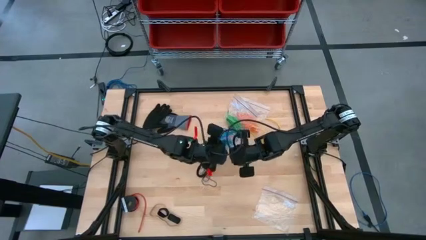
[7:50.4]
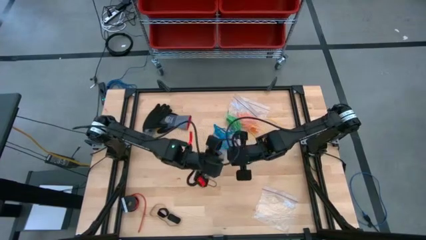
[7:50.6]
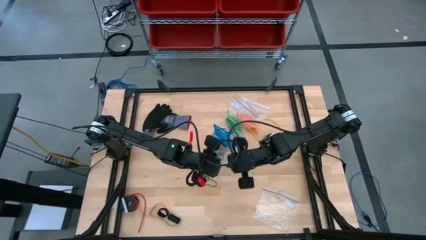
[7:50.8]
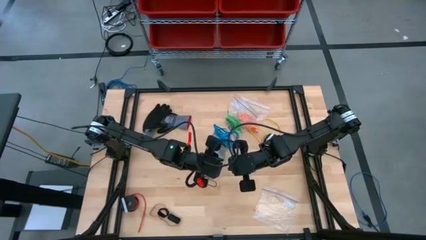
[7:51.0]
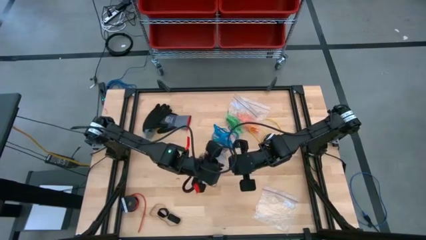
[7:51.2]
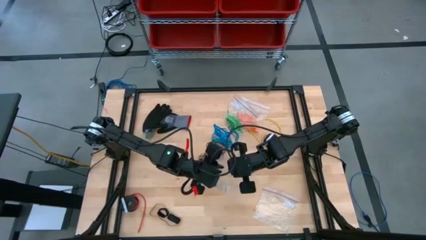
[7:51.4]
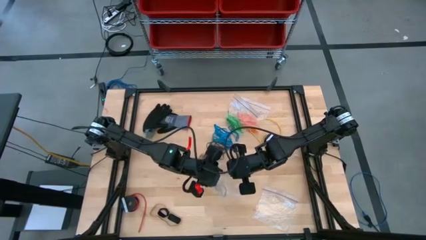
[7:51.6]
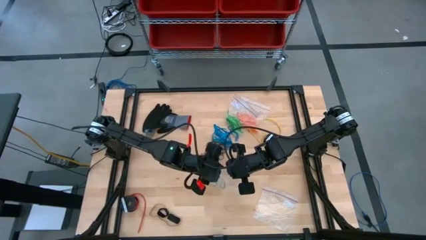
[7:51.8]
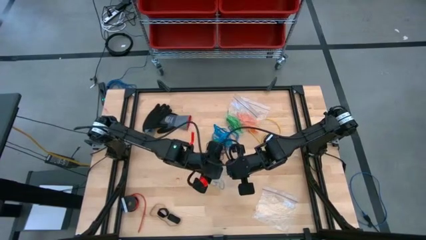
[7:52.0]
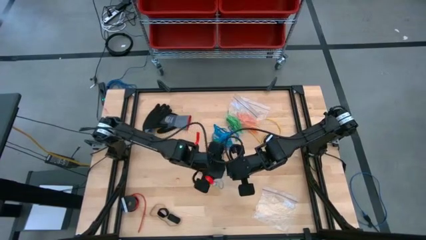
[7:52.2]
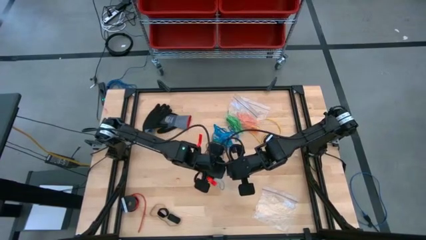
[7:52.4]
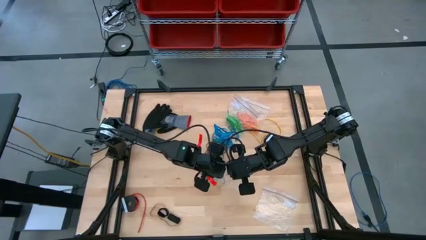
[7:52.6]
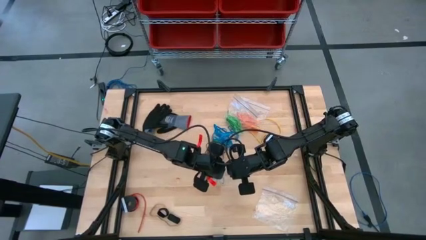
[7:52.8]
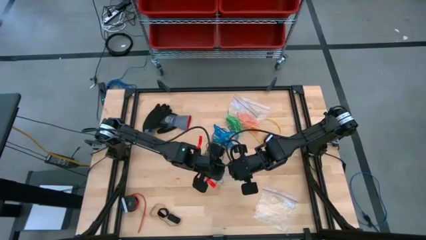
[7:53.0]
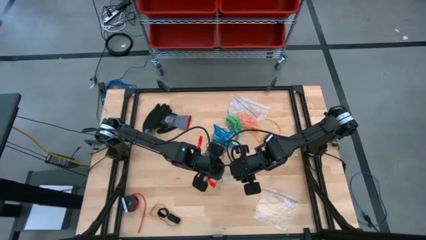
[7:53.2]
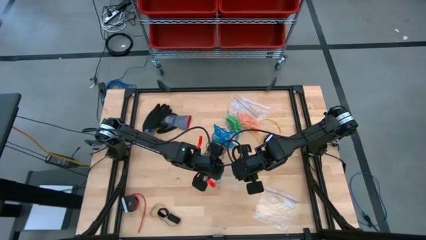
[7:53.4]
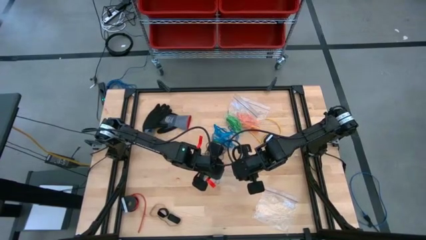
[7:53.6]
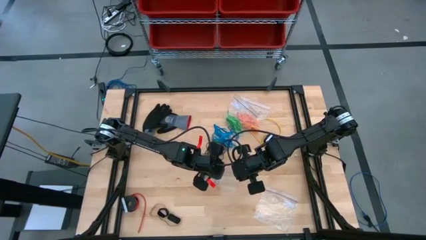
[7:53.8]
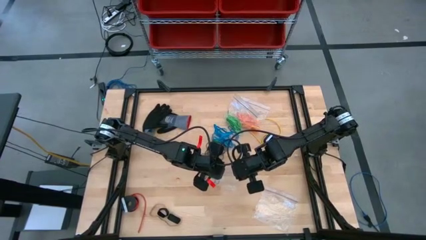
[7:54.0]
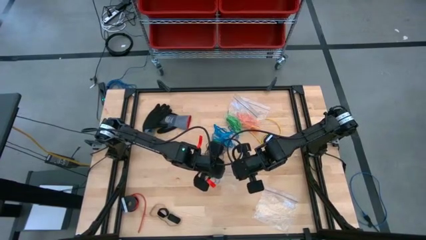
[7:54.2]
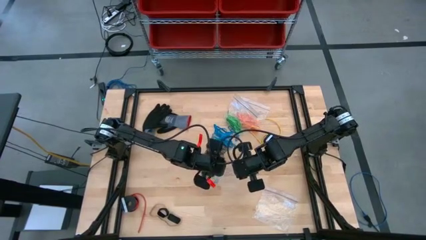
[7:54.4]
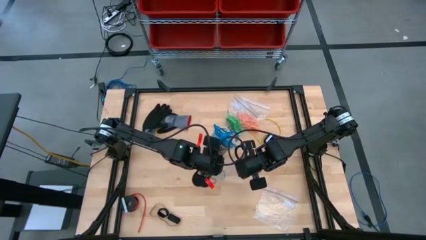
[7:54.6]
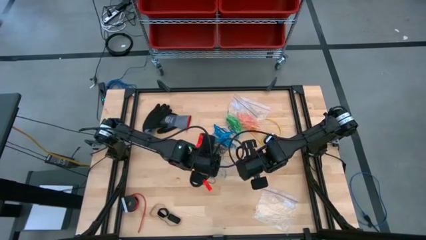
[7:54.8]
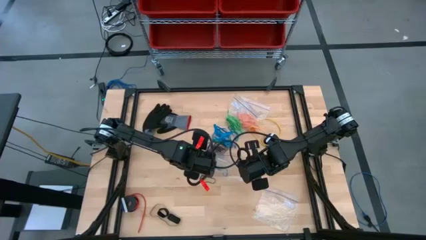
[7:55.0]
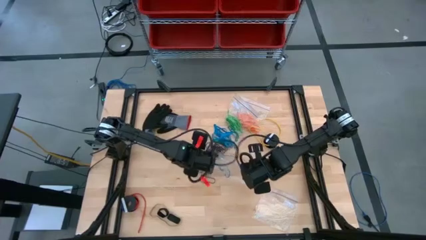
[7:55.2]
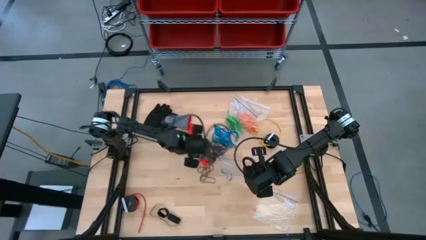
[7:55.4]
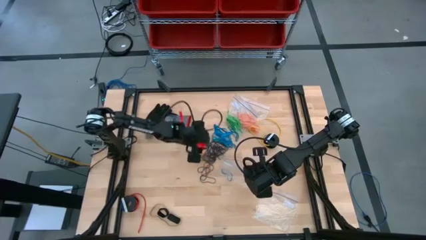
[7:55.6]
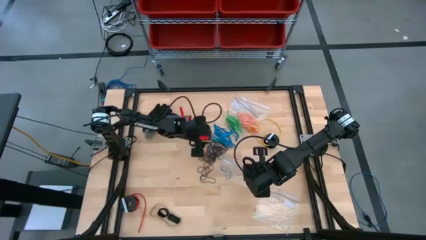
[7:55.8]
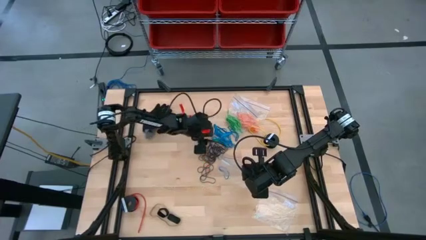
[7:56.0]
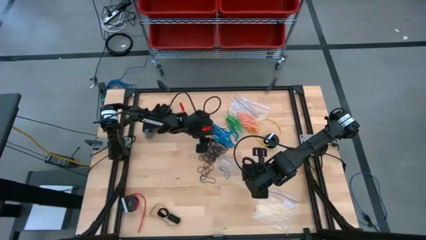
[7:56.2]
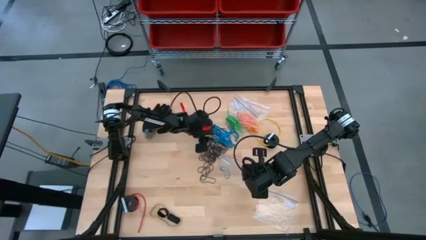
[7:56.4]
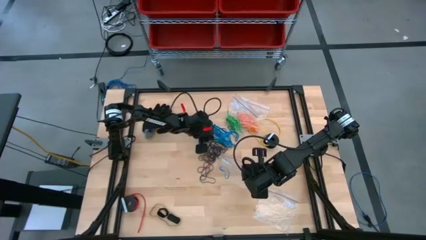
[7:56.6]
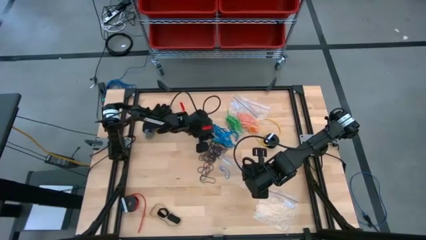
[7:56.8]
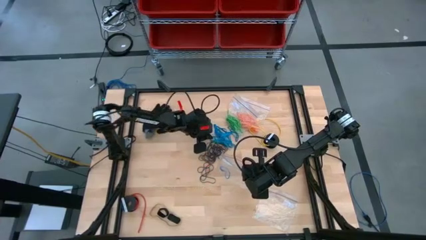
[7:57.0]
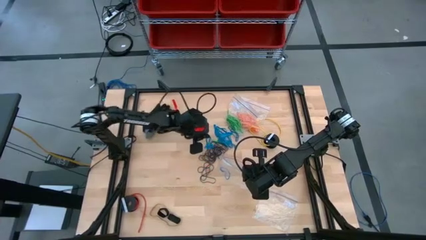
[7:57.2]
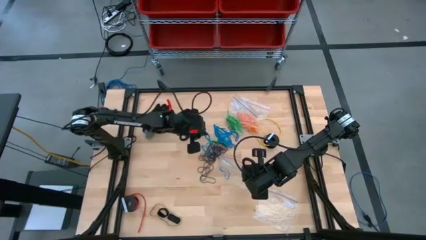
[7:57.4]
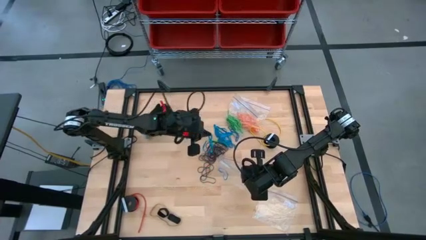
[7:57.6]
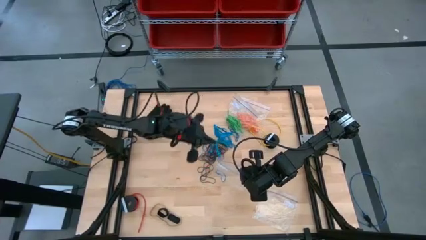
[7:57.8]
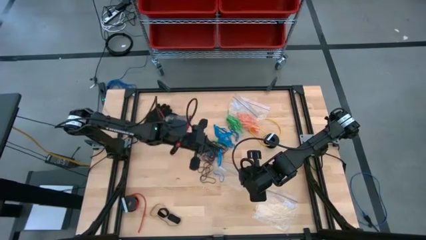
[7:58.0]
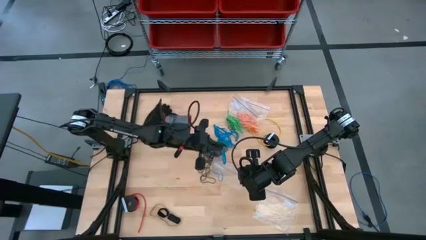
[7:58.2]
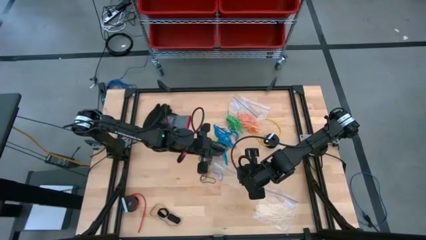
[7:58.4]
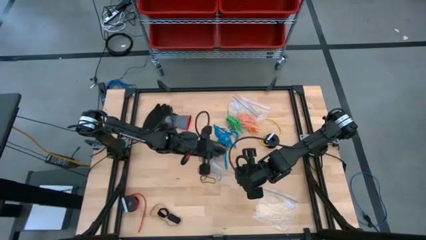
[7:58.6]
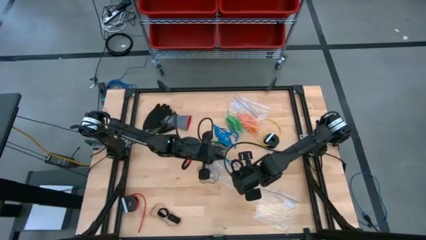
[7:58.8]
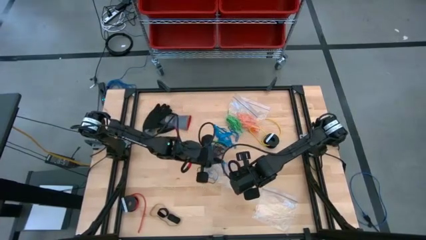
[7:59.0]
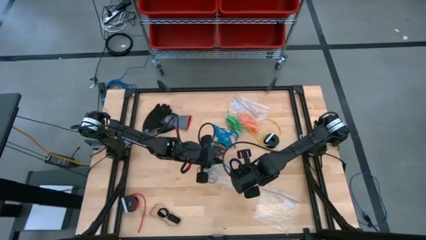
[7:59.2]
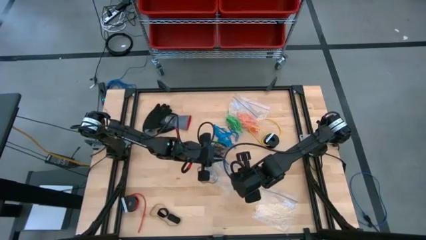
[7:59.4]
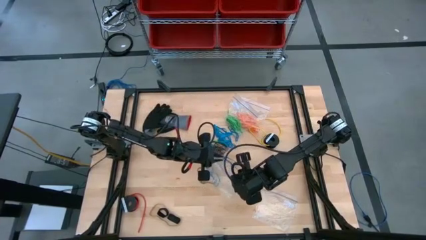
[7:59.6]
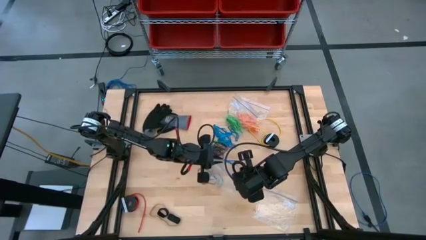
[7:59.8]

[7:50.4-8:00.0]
Task: Sort rubber bands
Put the blue rubber band into the transparent zip bag

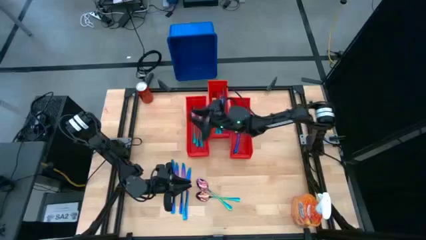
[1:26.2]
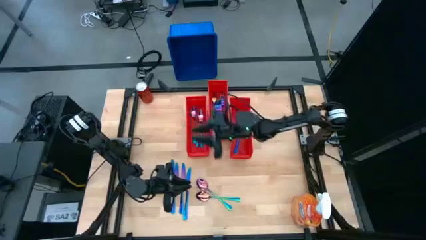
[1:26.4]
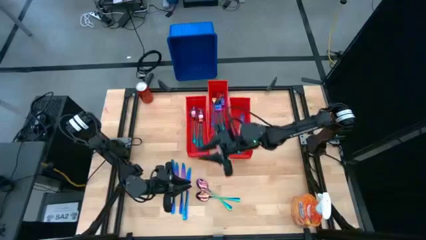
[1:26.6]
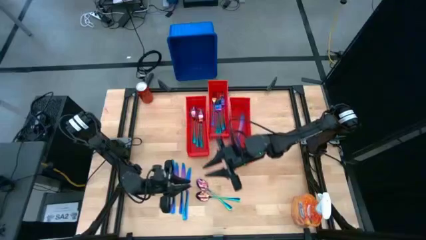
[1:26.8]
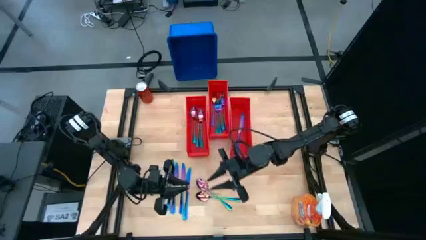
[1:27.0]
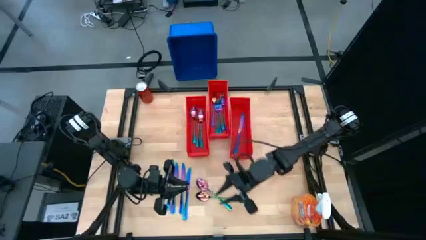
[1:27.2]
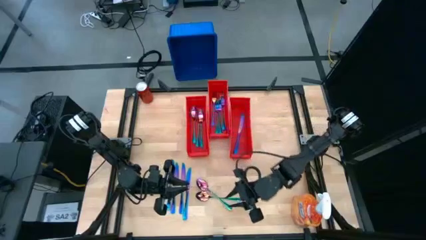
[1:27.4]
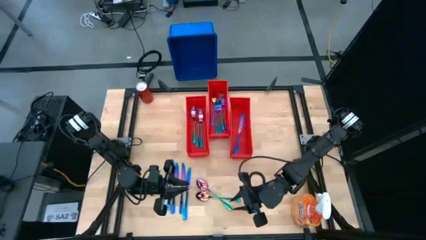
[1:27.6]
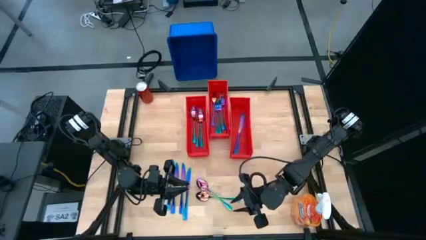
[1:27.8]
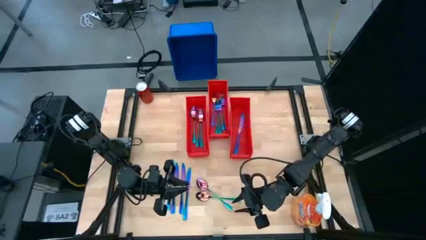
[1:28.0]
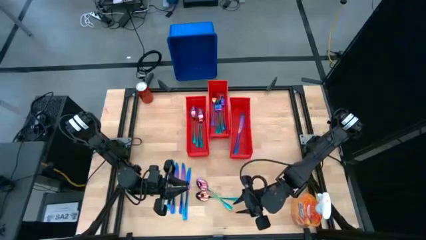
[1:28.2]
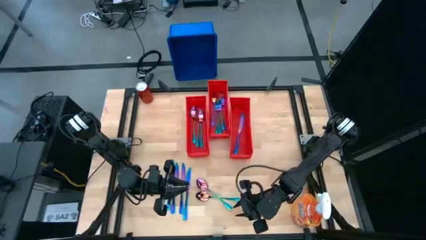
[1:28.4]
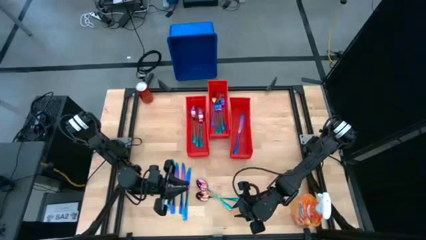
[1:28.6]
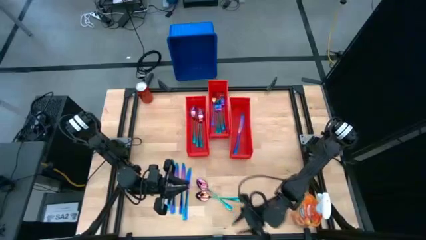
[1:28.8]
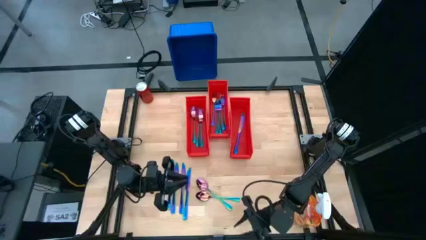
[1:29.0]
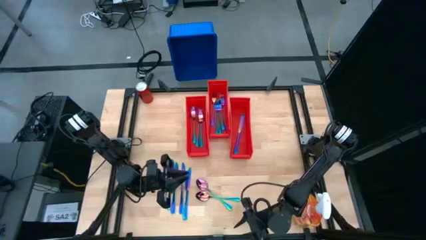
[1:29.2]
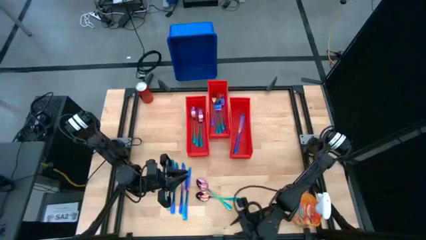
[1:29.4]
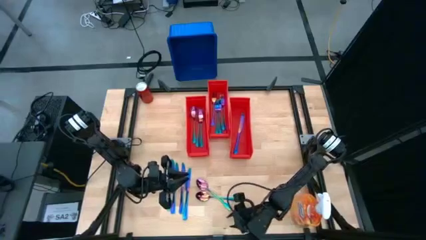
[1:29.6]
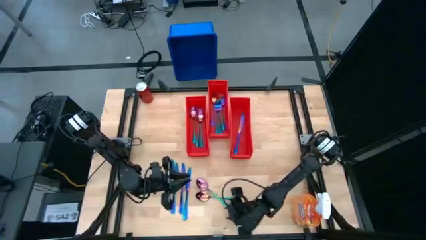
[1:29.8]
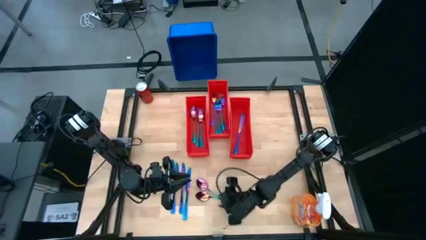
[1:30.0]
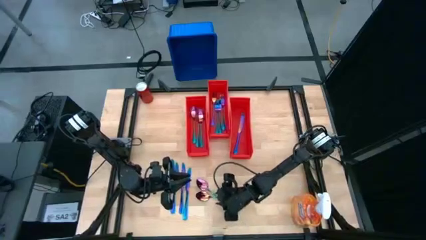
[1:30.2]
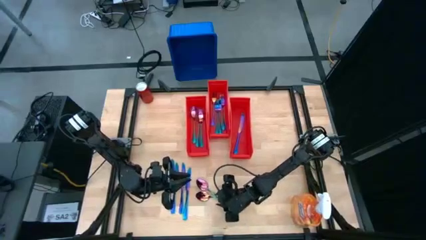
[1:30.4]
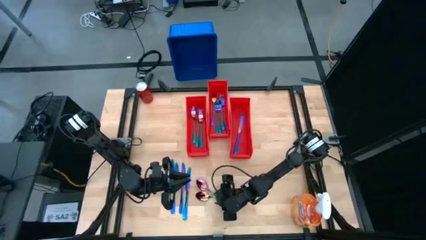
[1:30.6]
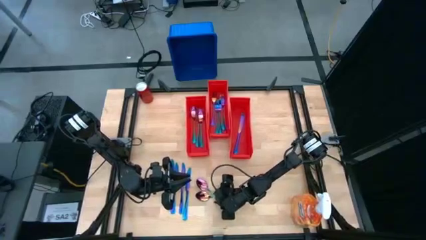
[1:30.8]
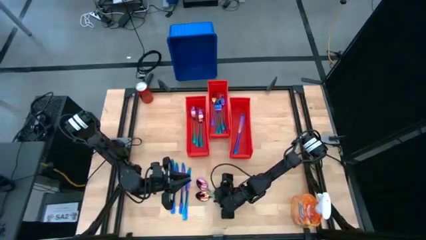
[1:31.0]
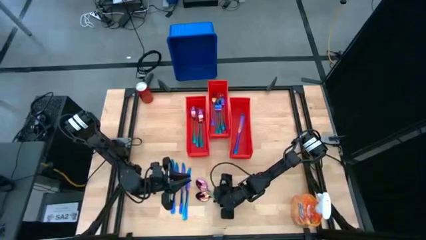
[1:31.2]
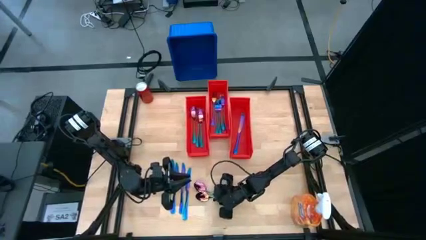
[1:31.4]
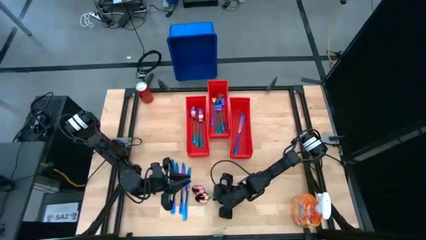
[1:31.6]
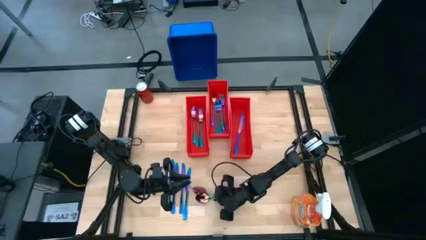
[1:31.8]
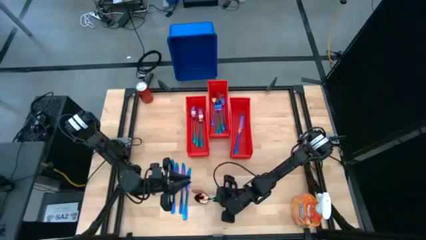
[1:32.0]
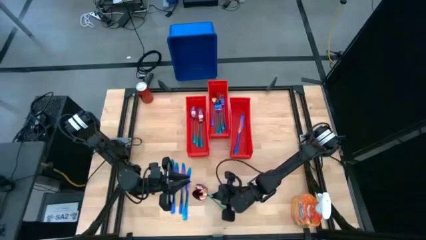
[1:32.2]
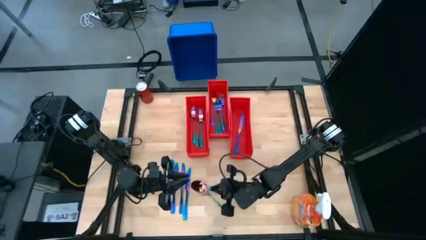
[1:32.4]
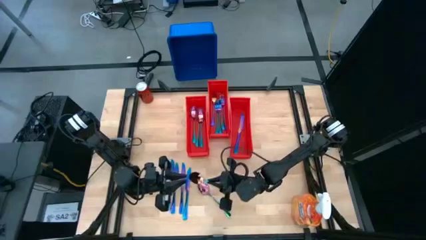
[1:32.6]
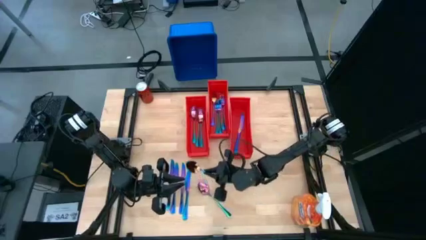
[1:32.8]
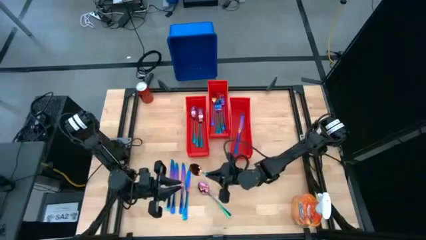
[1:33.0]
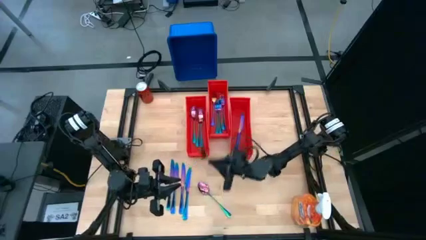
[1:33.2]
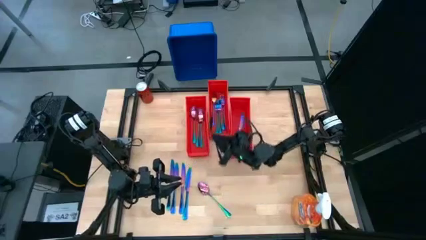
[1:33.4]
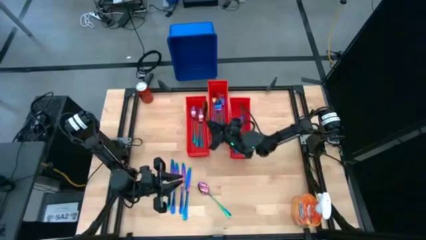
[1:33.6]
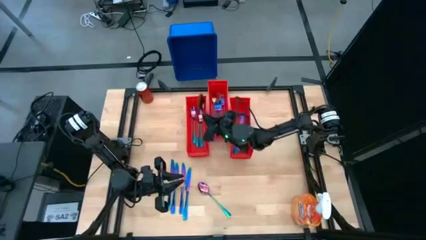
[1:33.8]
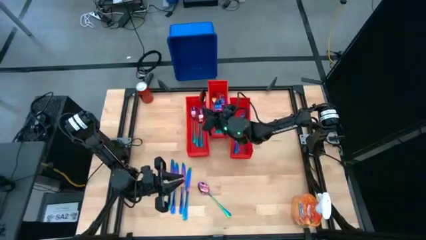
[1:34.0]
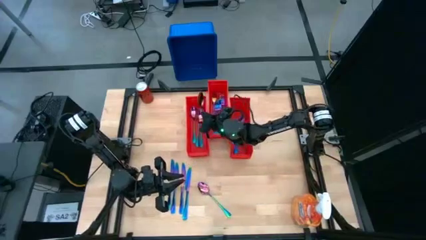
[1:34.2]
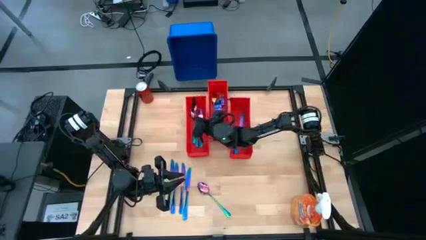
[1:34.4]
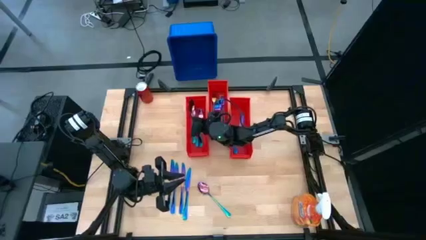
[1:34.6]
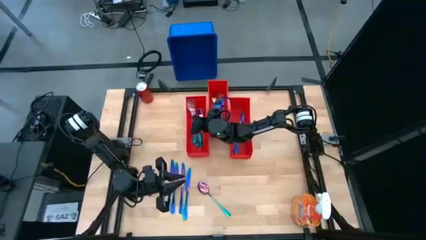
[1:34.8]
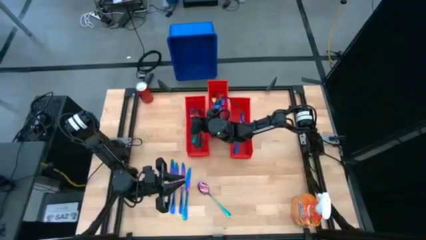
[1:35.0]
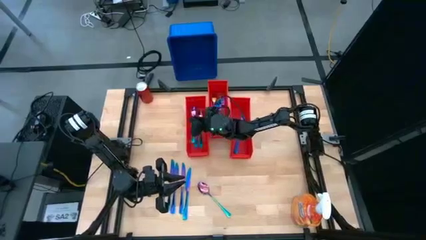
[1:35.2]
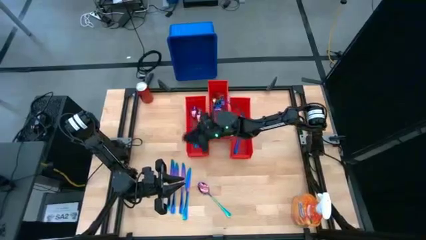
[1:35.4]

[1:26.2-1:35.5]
Task: Sort silverware
Put the iridescent spoon into the left orange bin
